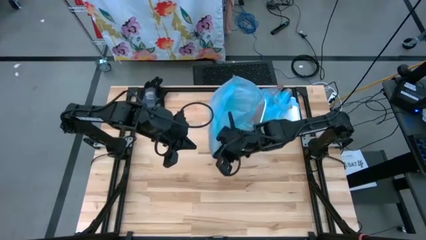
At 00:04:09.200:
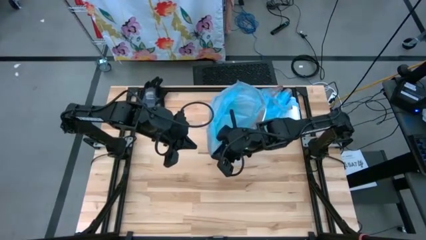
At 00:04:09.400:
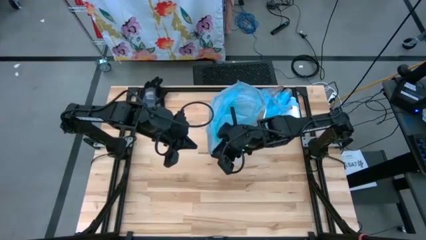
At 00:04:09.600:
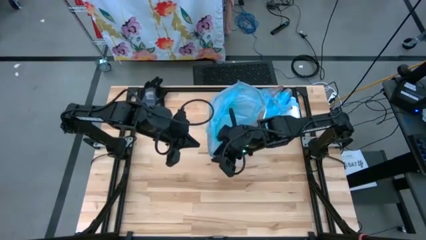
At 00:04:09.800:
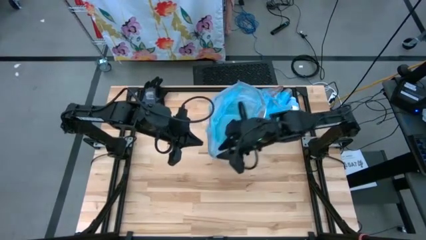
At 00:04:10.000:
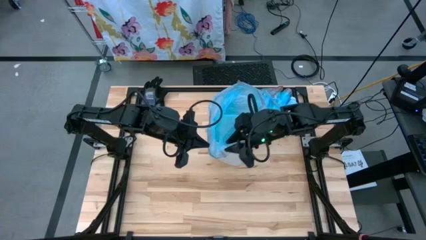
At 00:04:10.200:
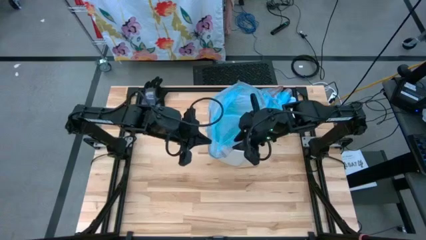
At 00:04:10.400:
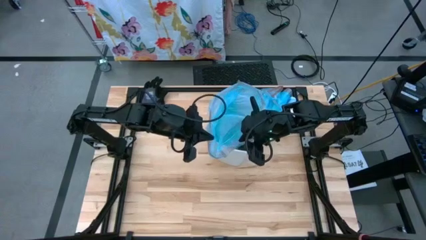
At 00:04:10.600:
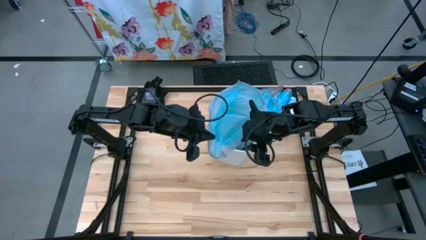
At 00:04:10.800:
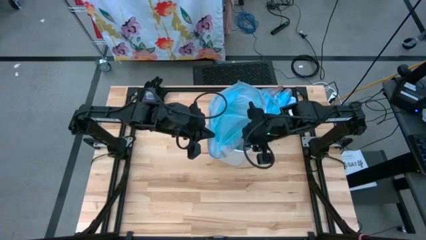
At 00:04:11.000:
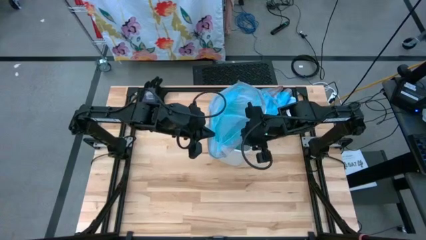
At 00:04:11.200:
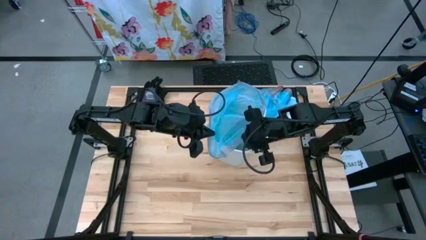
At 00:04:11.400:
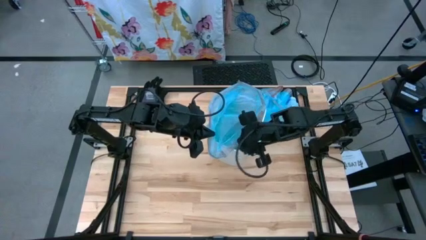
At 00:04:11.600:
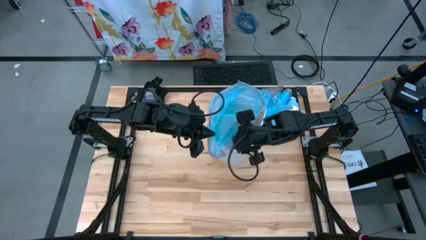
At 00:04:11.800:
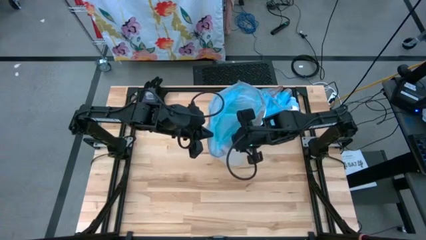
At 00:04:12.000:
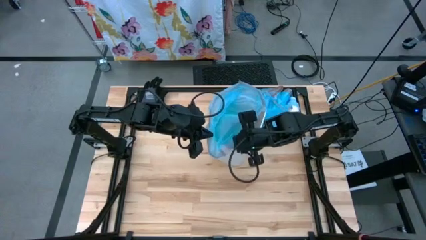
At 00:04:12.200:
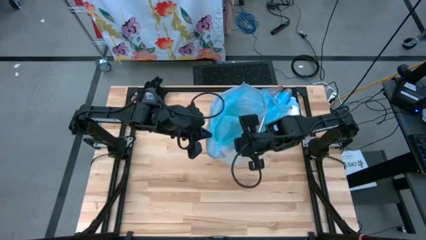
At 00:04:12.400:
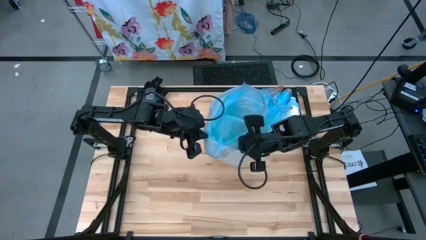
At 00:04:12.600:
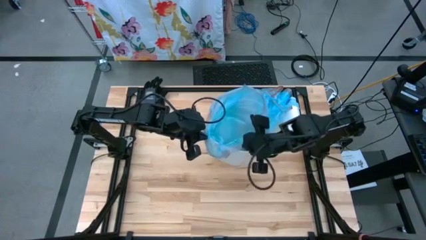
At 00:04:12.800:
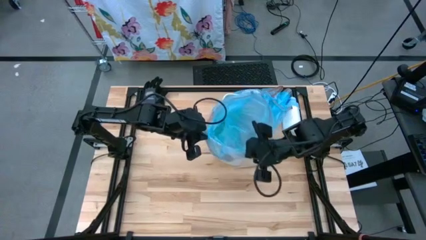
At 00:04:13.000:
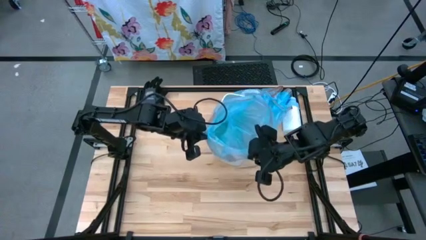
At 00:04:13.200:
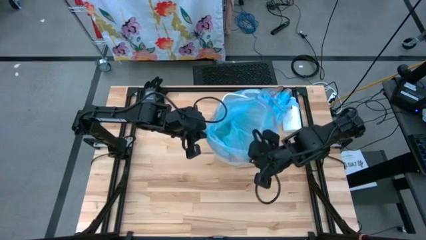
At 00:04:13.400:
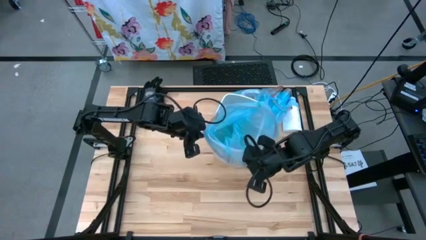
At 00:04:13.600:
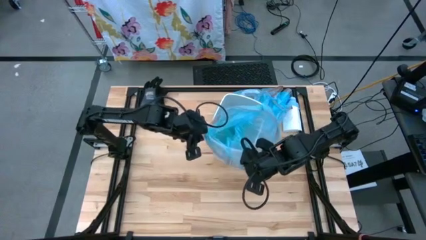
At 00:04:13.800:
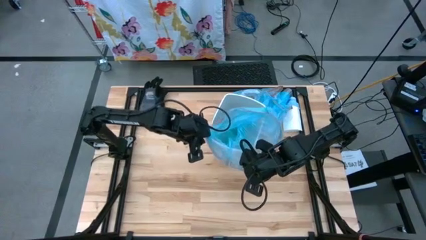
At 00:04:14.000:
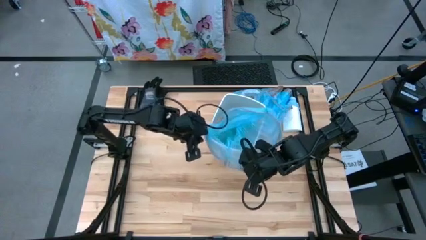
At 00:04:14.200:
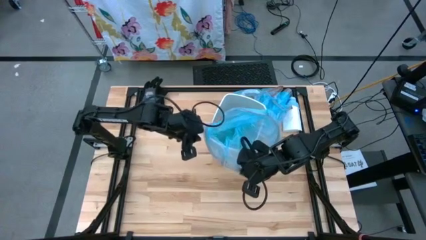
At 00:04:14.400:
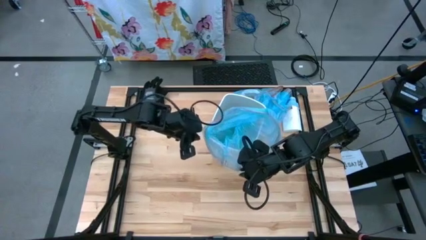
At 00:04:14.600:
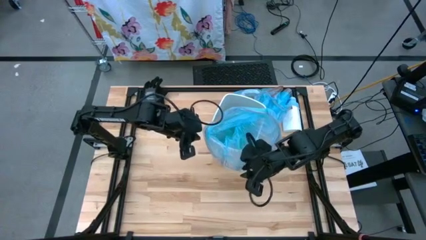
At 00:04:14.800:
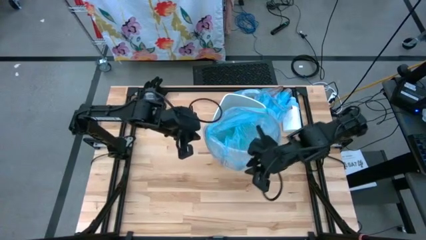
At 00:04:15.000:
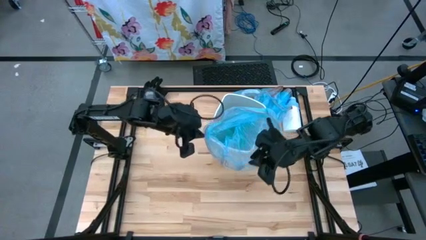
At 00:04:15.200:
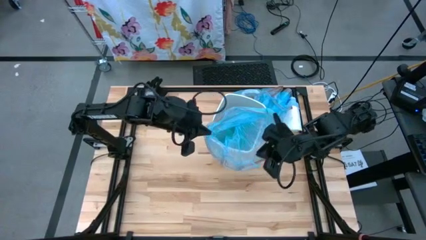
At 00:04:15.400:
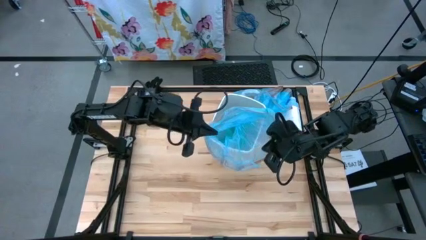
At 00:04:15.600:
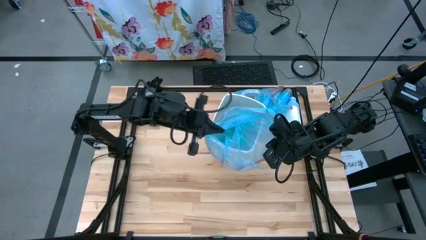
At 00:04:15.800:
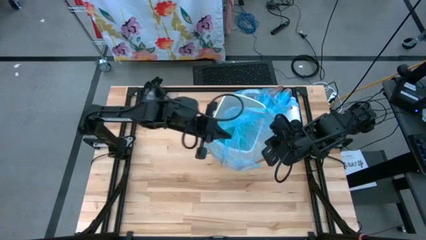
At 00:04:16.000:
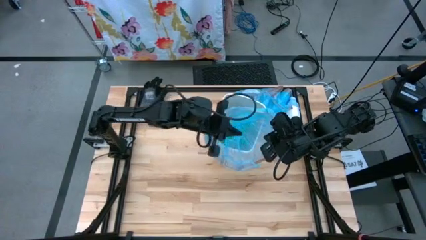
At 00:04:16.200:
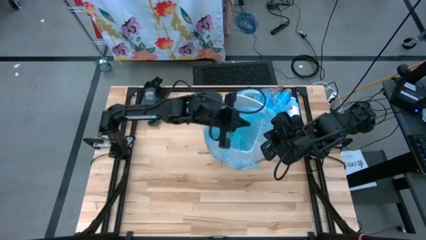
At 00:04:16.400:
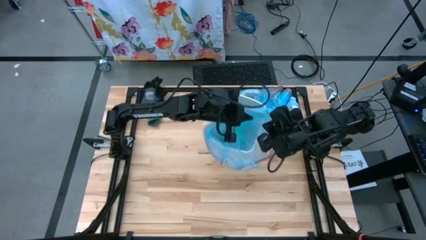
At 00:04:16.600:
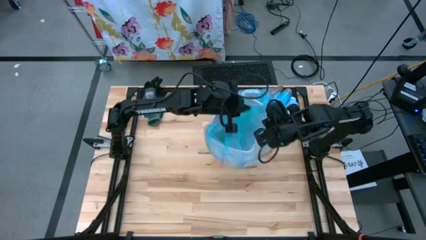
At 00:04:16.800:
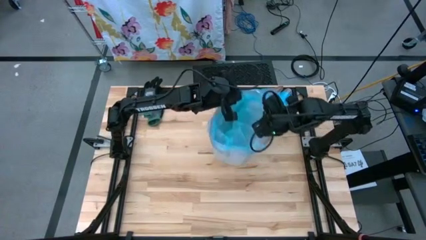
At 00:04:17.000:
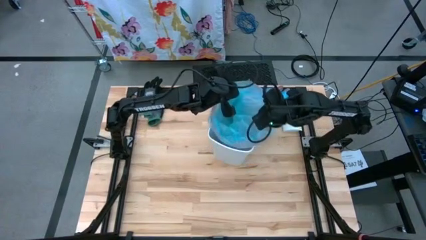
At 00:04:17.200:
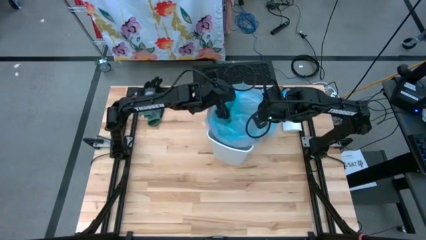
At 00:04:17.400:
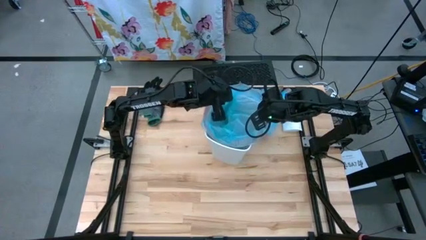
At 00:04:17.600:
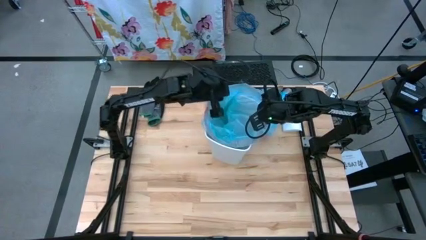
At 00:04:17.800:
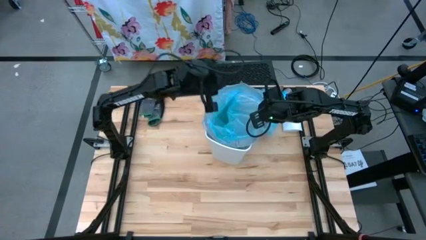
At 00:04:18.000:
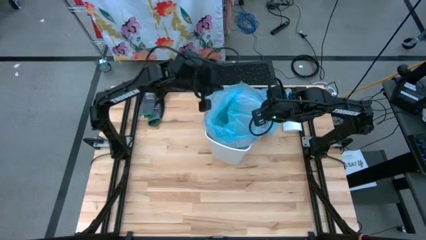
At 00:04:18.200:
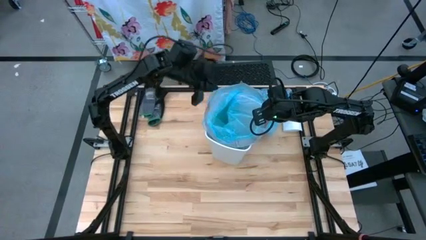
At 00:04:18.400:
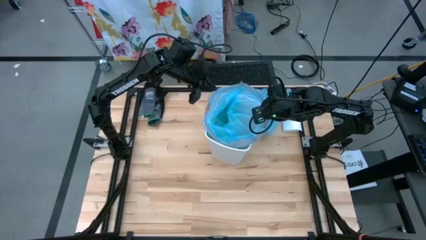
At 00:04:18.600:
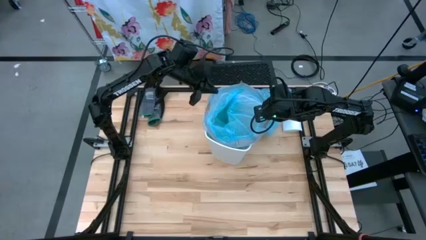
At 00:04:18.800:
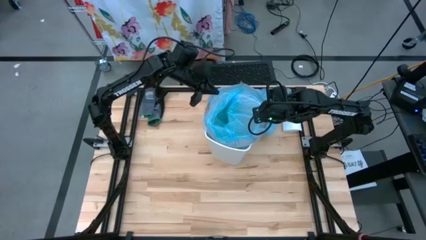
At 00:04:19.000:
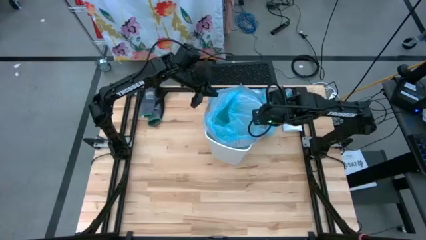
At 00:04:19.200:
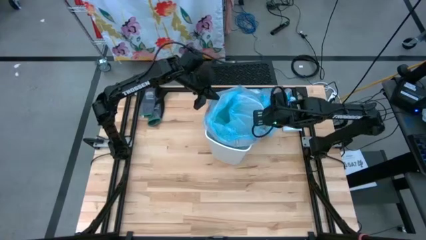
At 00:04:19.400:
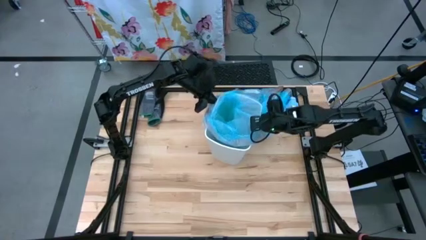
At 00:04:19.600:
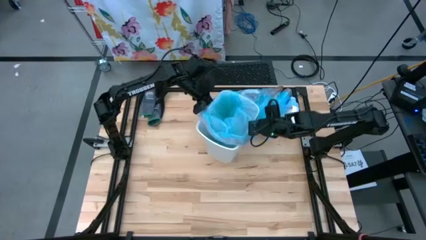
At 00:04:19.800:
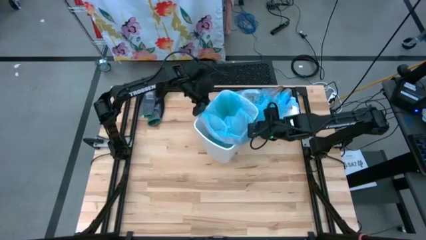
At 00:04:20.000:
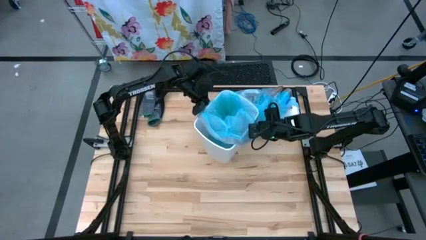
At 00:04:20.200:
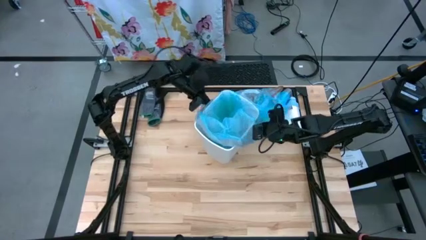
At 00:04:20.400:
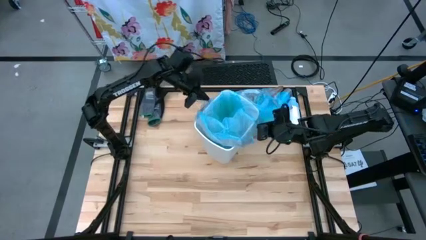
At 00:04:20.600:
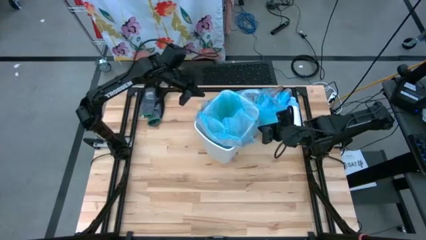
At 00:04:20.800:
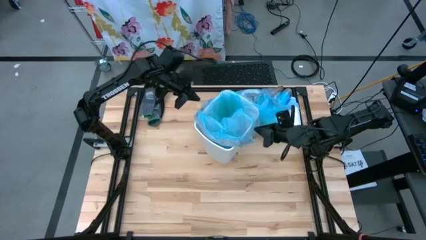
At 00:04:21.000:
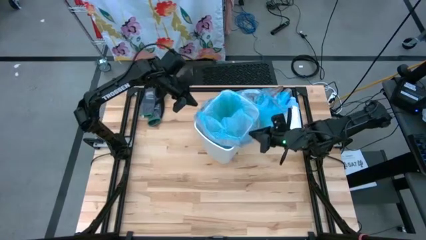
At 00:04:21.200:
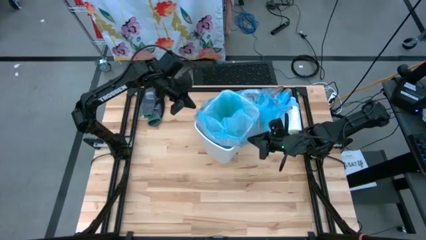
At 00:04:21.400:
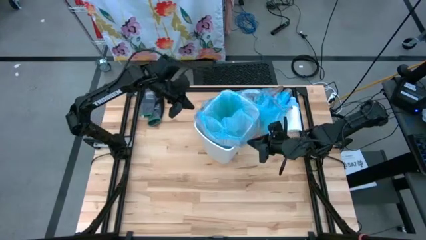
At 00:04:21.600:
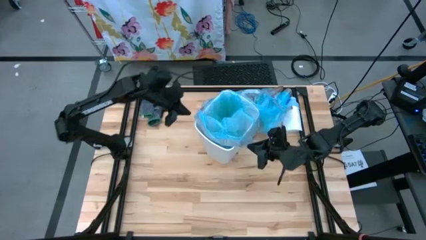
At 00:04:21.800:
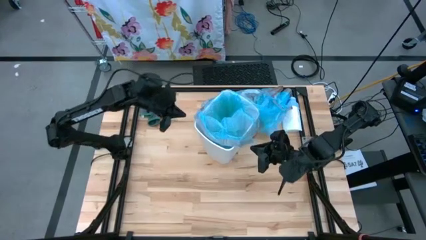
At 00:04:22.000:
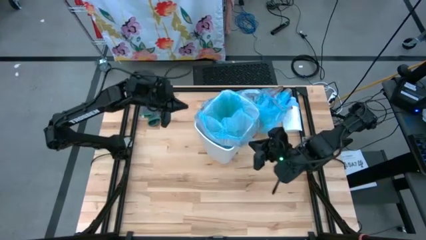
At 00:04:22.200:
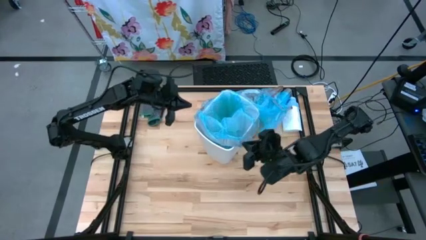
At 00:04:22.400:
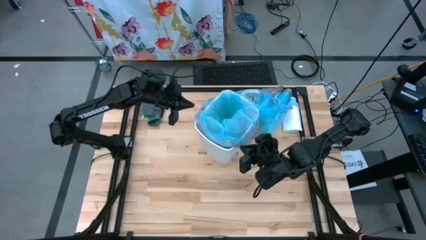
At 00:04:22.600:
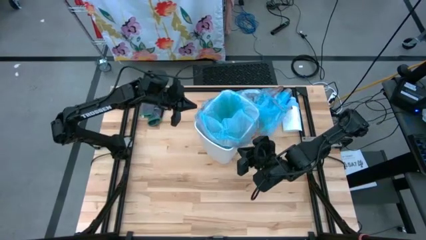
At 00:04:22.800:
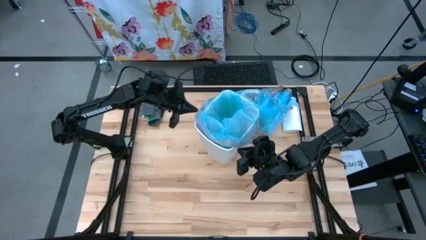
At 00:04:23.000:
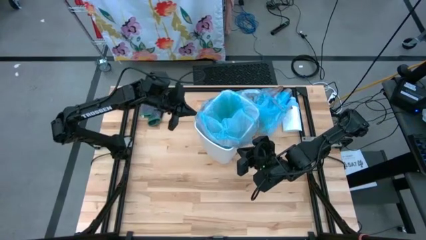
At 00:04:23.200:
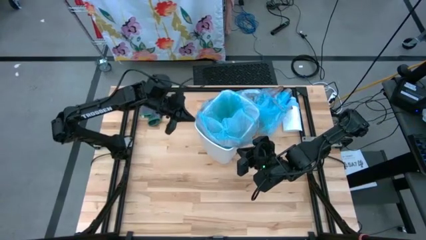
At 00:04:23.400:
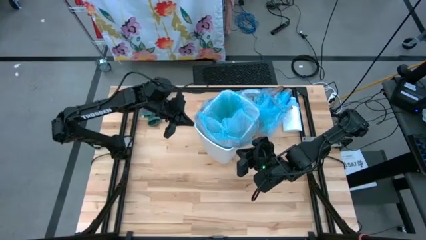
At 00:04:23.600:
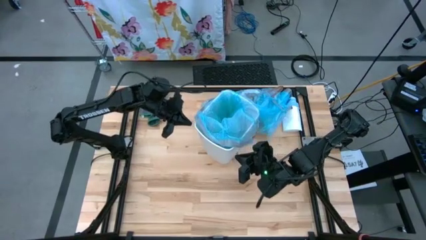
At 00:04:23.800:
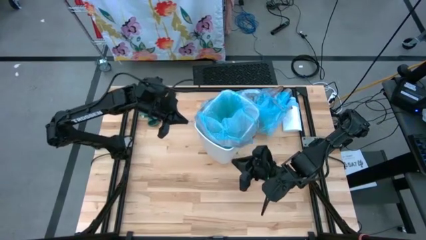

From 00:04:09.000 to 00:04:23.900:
Task: place trash/remove bag and relplace
Insert the new blue trash bag into the trash bin
